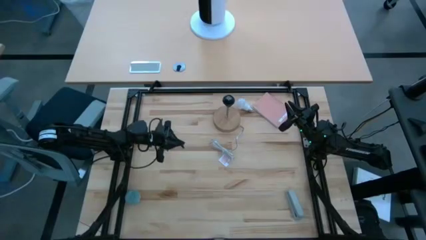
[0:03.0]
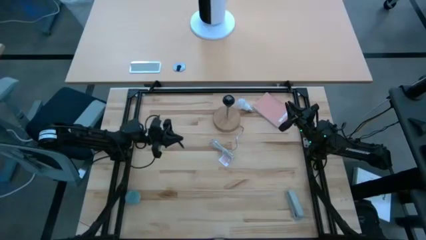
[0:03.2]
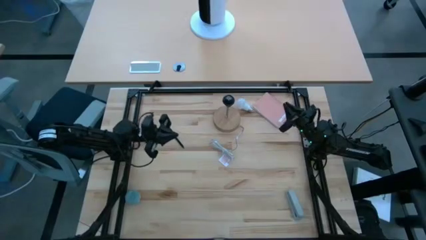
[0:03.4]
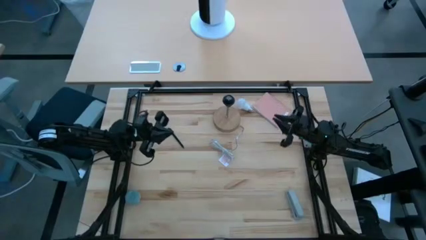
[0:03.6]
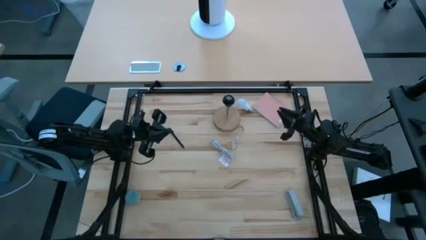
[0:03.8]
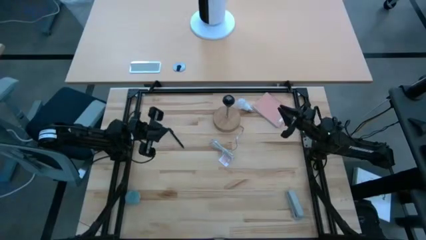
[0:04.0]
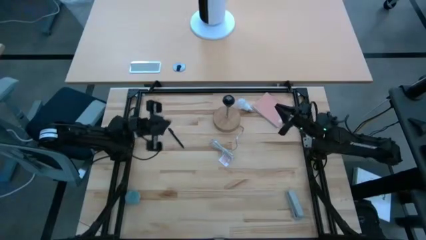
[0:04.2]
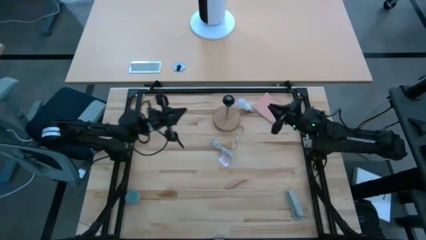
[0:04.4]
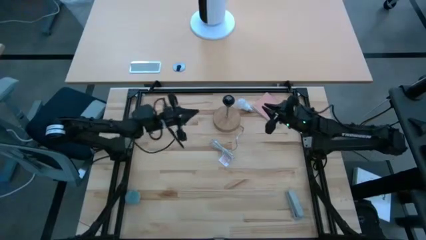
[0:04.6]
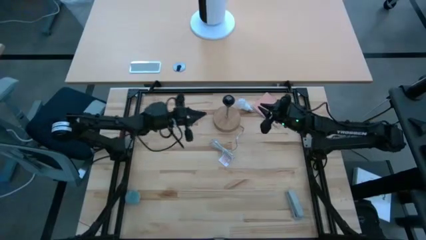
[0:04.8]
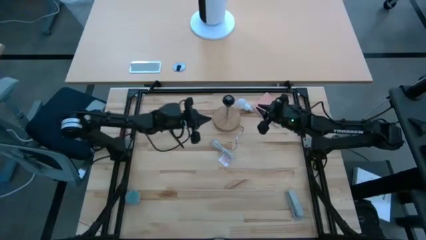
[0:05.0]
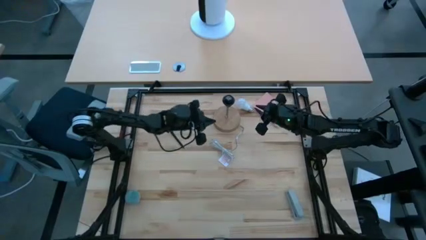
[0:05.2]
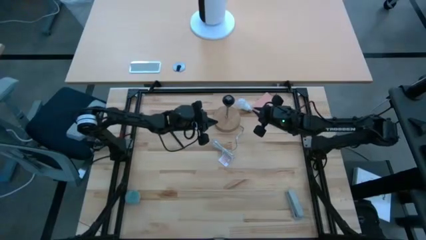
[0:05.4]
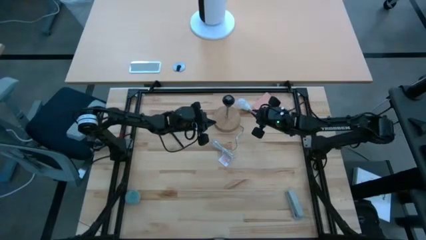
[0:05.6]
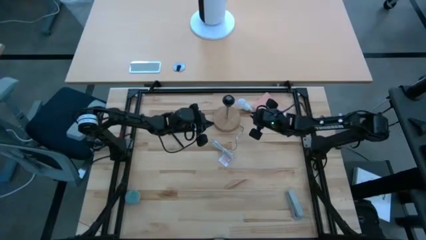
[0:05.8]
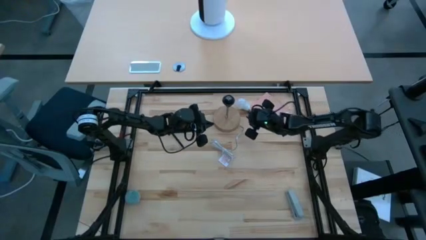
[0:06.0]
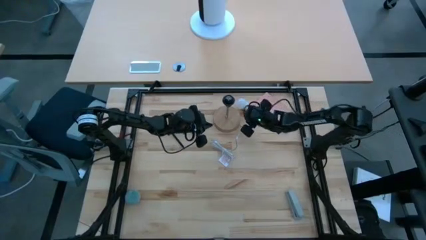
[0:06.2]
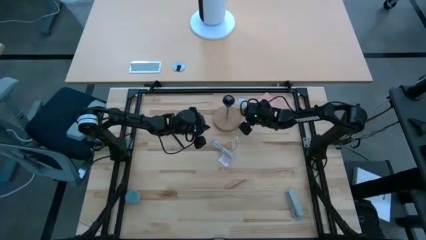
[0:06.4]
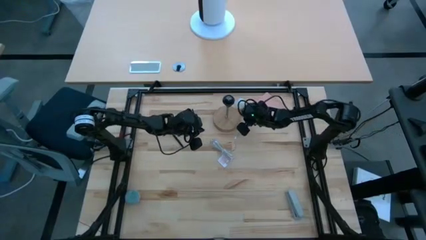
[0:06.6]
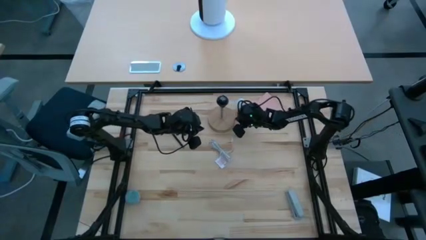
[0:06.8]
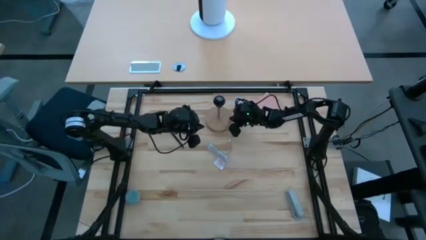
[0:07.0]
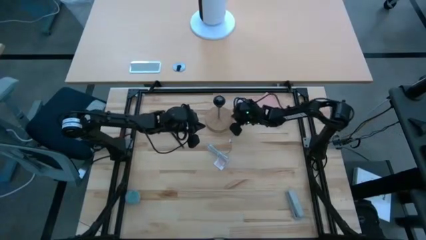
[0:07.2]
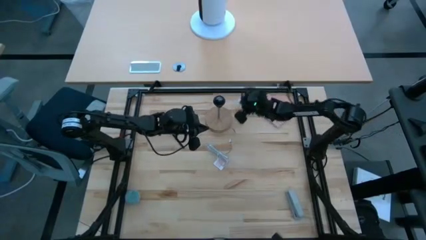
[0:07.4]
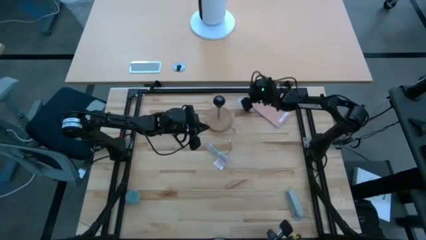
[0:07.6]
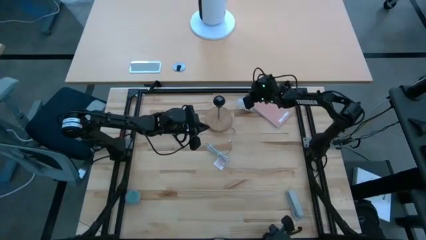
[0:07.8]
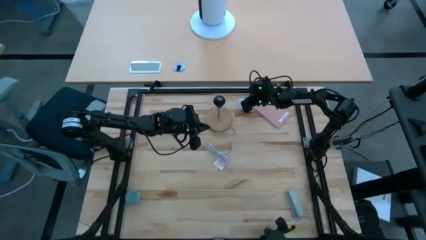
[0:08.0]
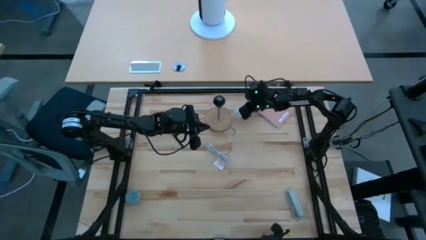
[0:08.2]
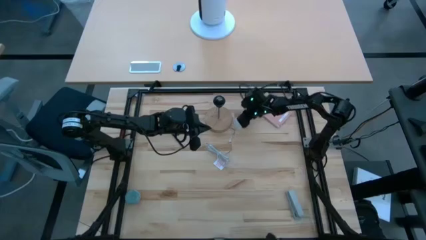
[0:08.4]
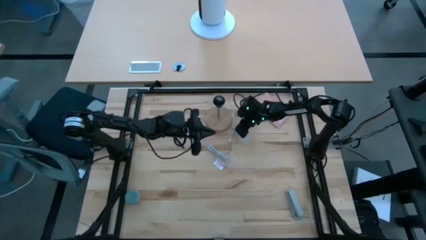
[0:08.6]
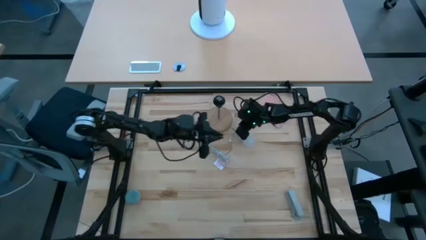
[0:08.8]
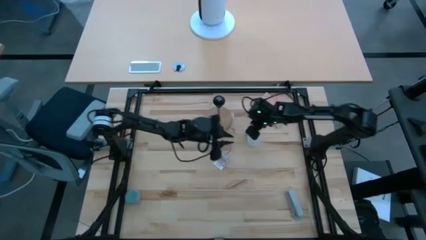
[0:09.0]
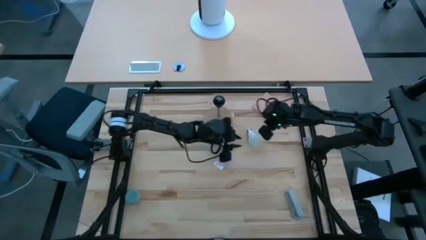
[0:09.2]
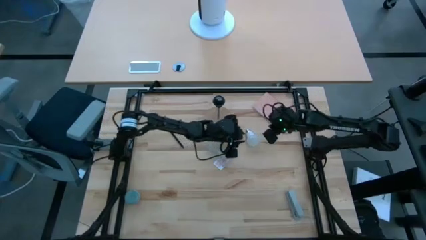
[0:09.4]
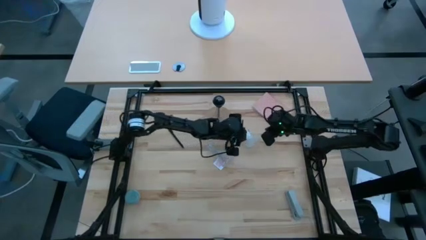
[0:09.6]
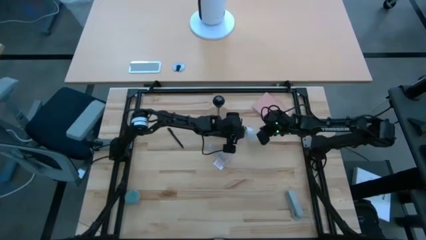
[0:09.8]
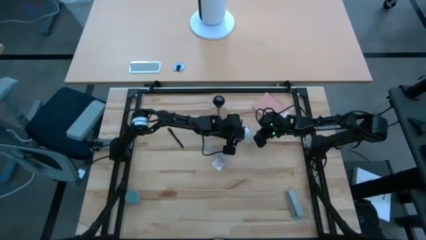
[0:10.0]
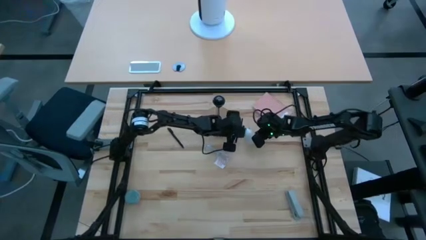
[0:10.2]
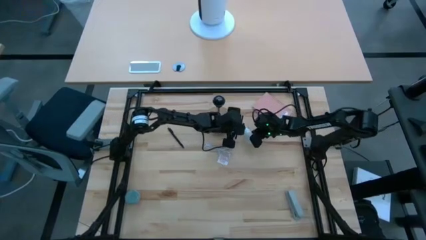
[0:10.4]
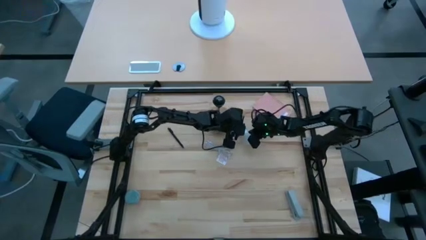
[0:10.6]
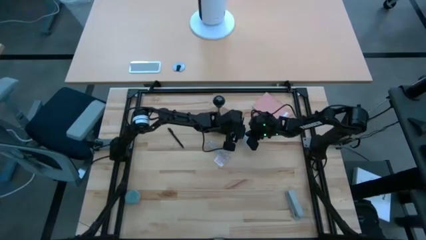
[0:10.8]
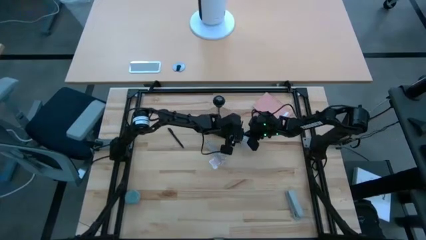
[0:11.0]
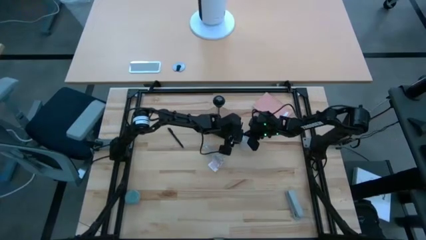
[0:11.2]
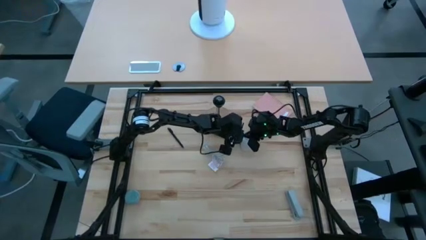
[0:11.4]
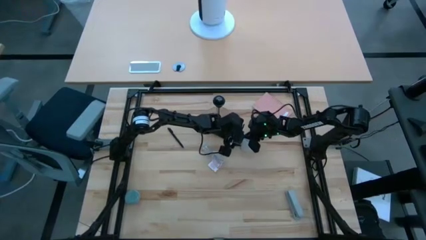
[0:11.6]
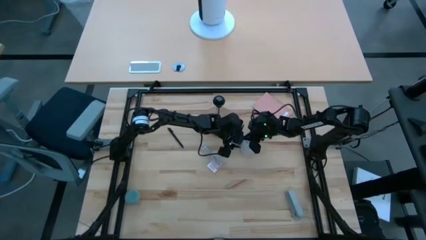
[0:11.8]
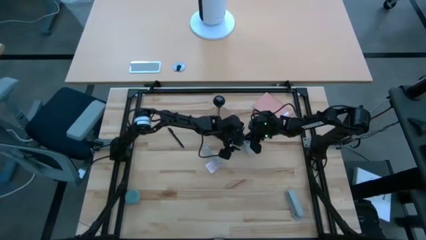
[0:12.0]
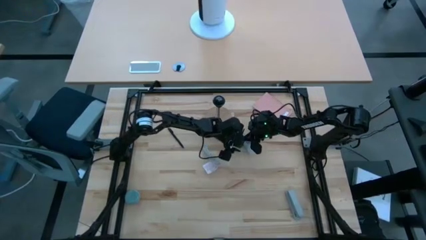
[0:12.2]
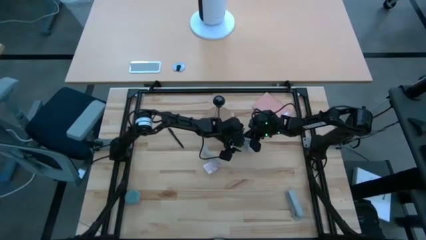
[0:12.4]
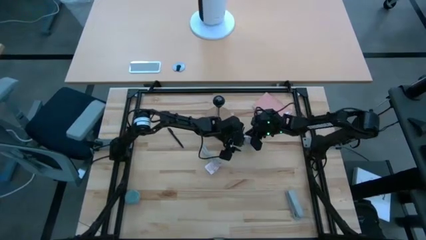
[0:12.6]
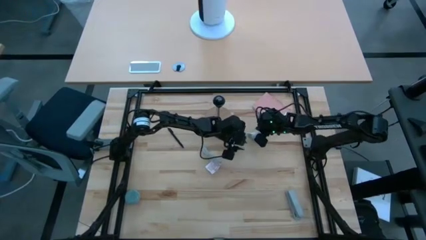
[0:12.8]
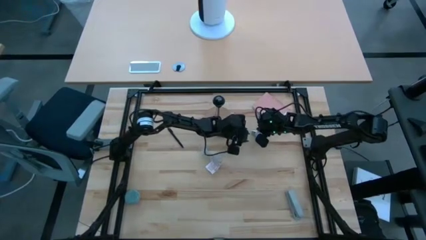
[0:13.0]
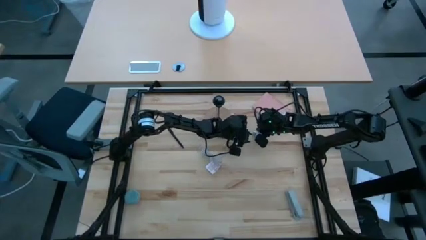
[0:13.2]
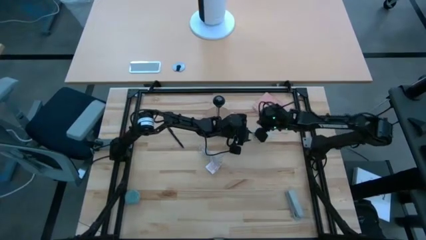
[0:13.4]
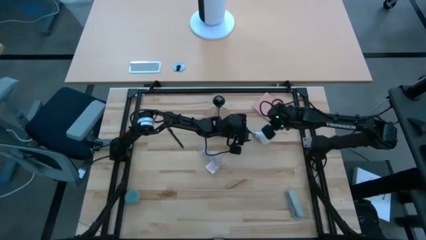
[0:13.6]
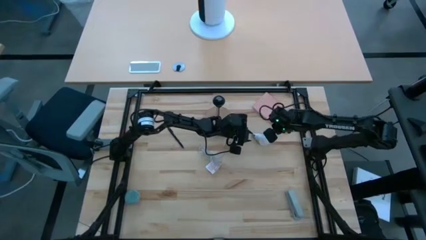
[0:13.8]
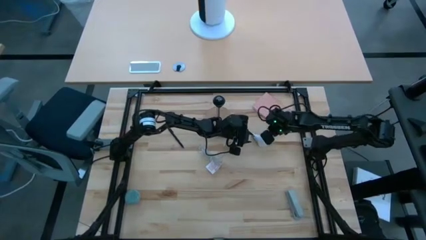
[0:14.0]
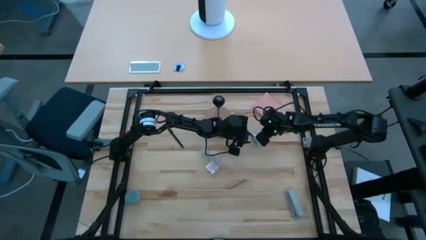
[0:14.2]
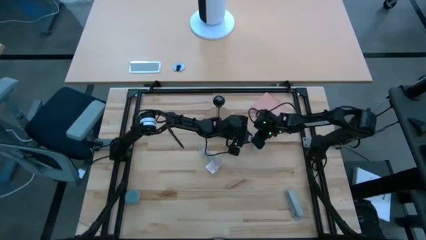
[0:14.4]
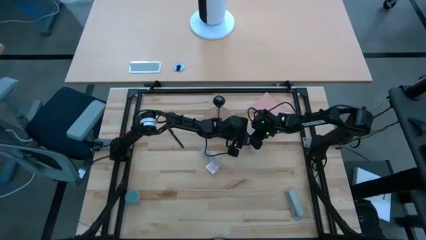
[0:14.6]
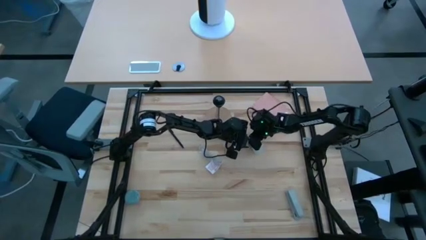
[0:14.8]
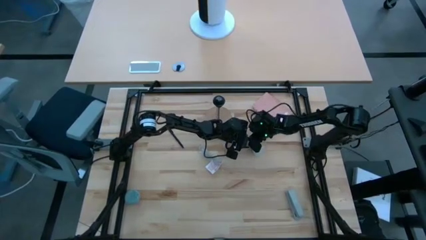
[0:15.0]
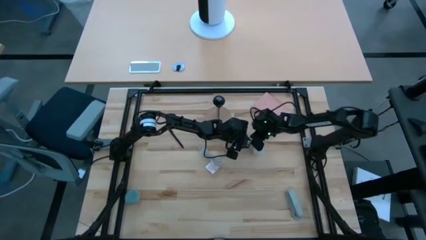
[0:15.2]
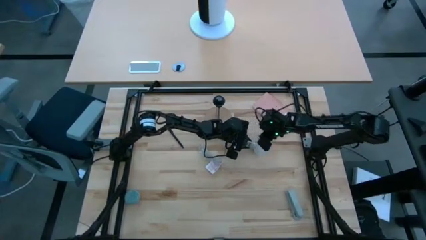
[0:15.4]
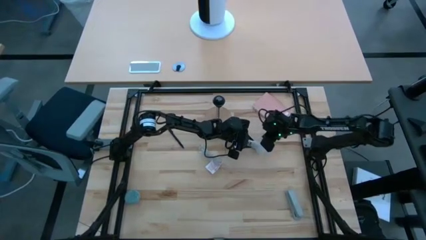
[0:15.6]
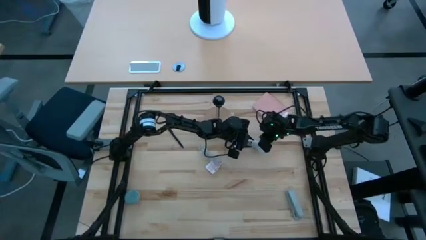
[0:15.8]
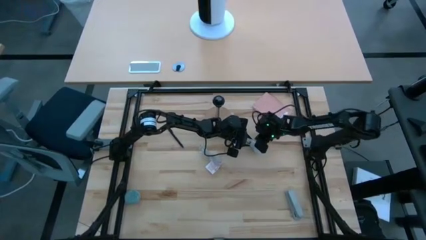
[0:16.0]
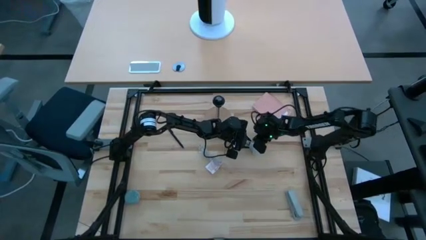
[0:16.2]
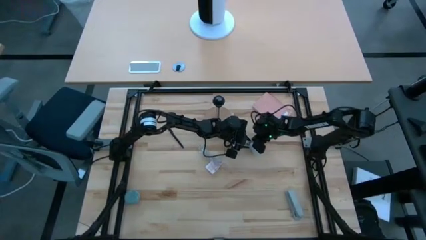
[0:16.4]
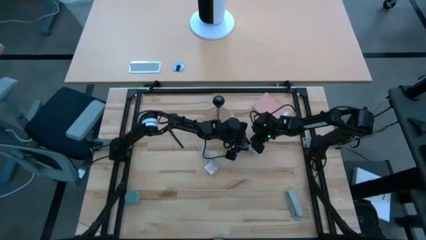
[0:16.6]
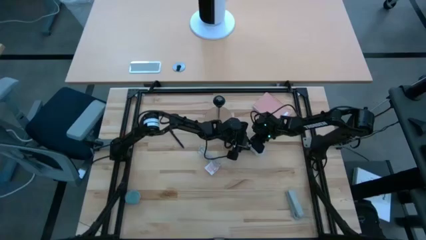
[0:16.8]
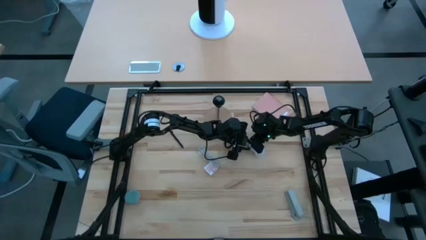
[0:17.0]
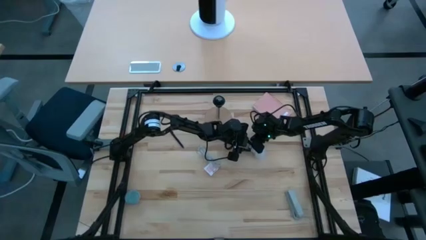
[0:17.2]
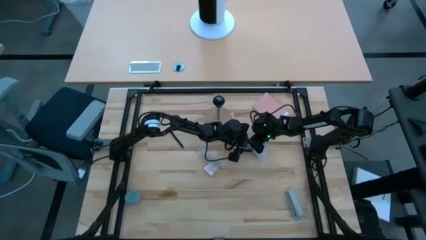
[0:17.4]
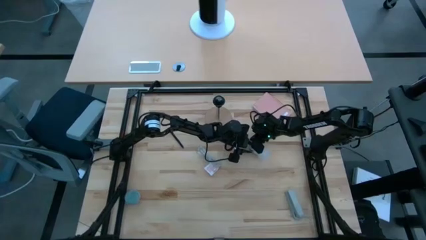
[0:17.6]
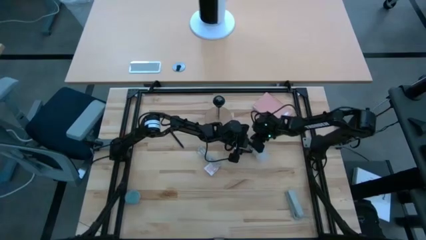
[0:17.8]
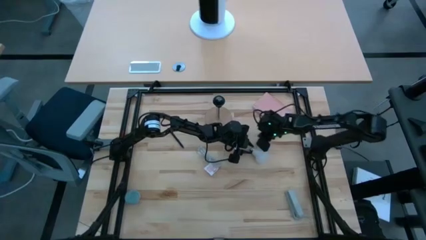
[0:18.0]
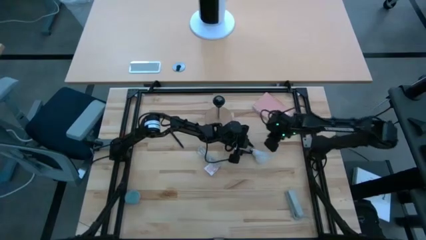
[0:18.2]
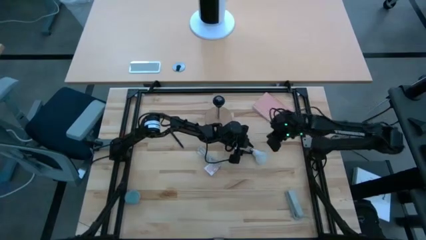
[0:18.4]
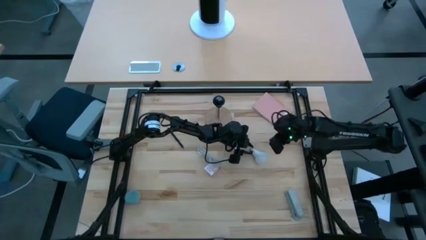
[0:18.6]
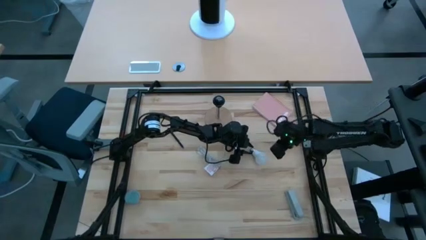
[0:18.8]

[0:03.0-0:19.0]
Task: Screw lightbulb
Insert the lightbulb into the lamp
